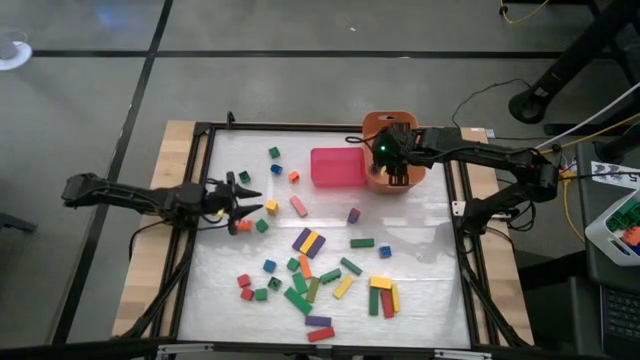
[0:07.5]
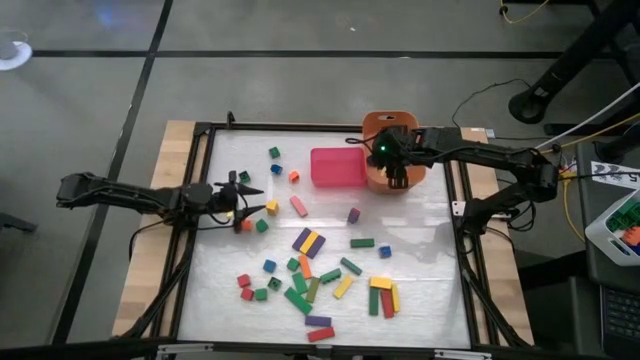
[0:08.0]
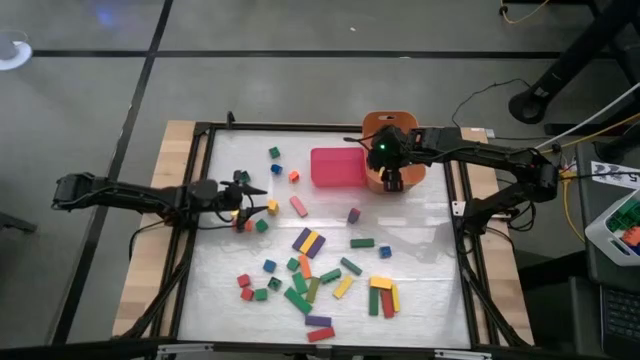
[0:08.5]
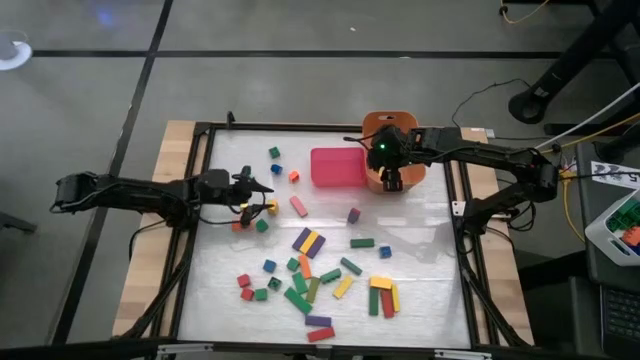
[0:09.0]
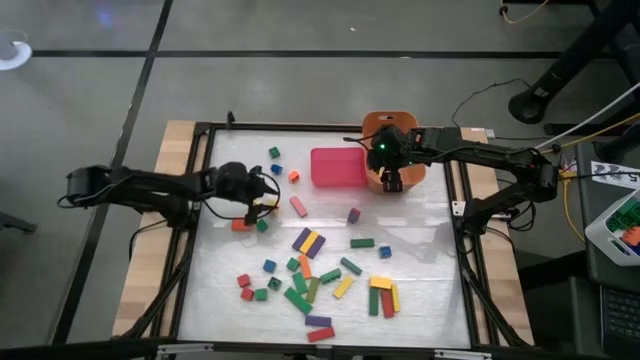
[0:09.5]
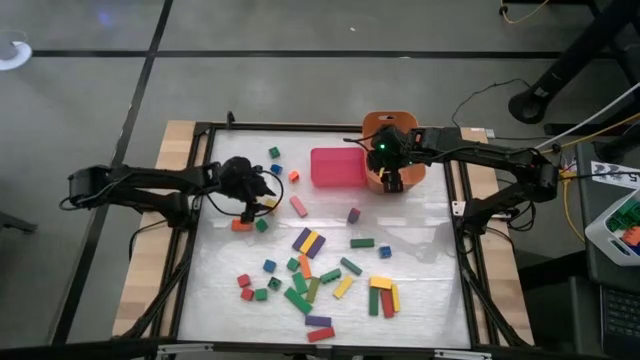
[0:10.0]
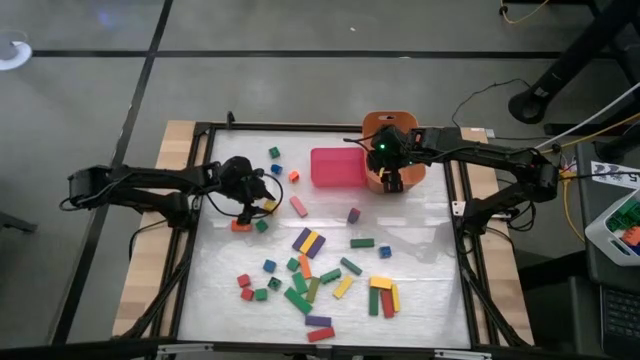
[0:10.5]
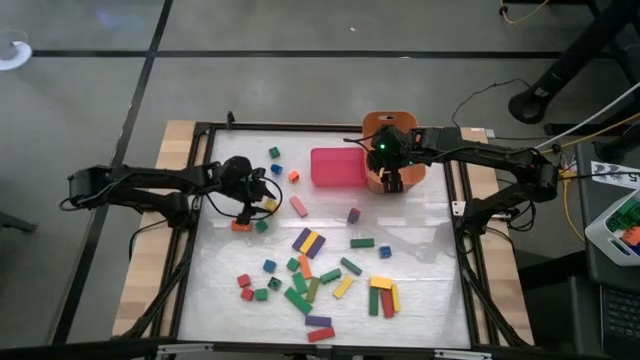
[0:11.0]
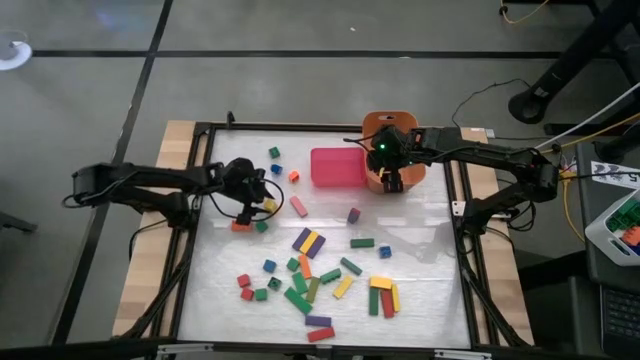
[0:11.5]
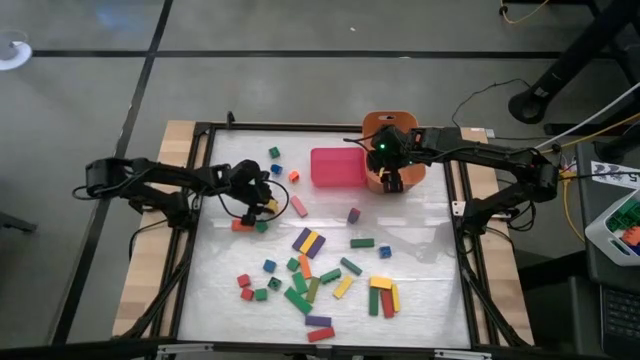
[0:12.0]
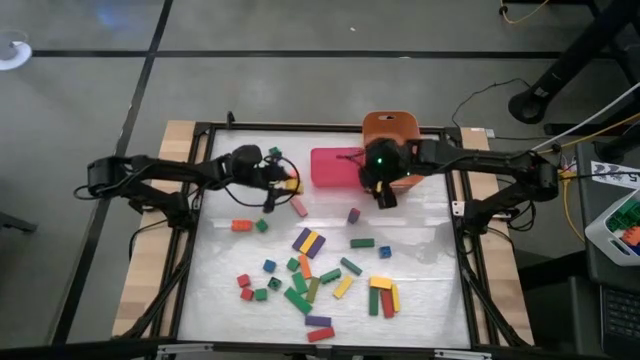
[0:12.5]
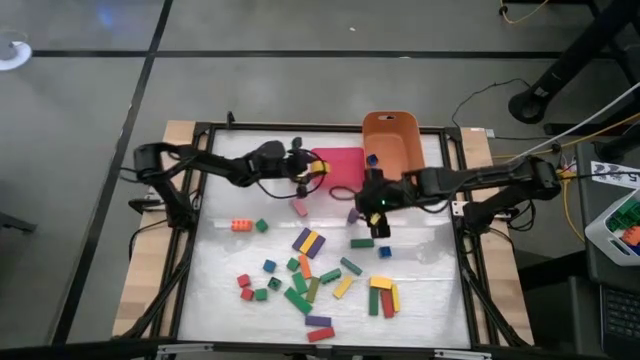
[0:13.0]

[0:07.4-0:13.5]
Task: Sort blocks by size
Put the small yellow block into the pink bin

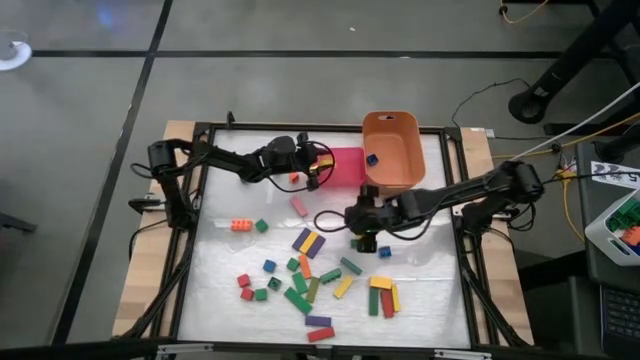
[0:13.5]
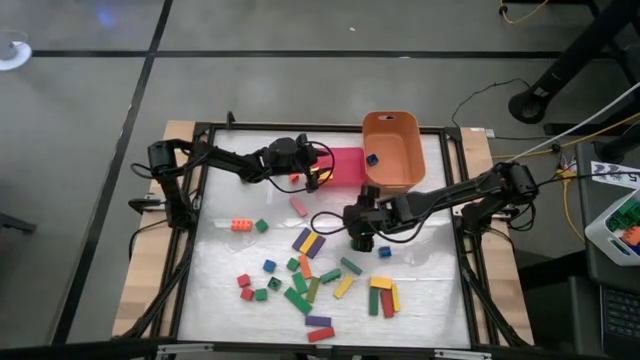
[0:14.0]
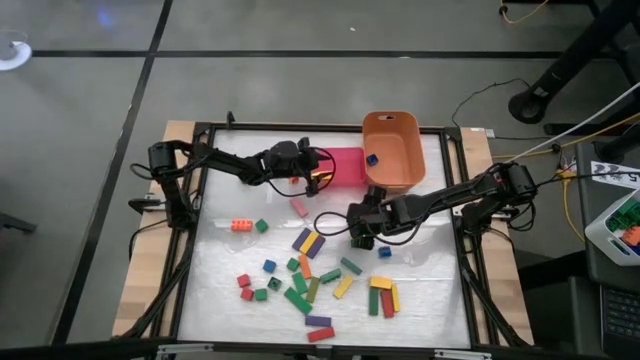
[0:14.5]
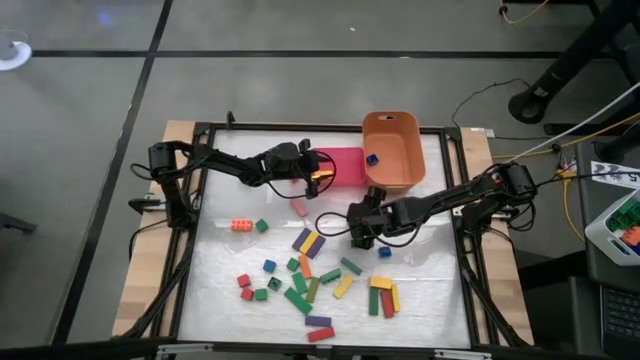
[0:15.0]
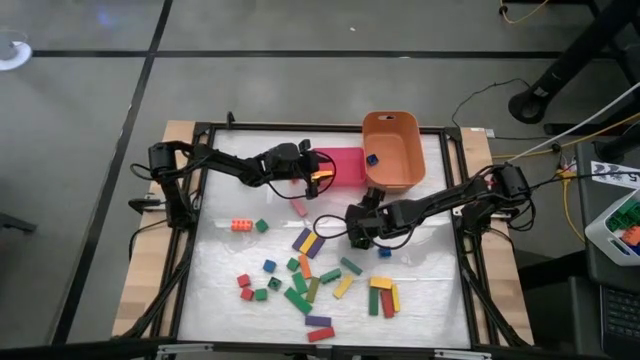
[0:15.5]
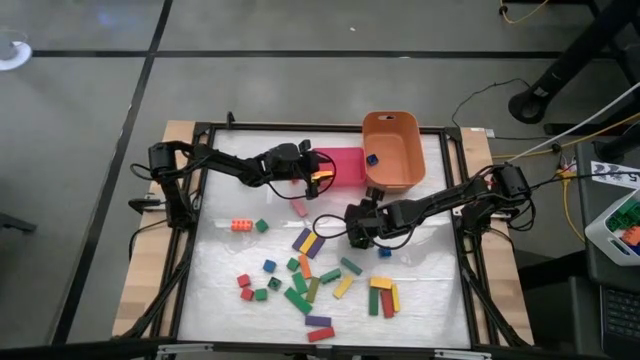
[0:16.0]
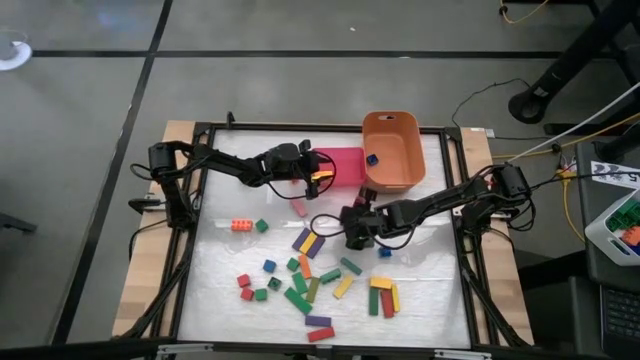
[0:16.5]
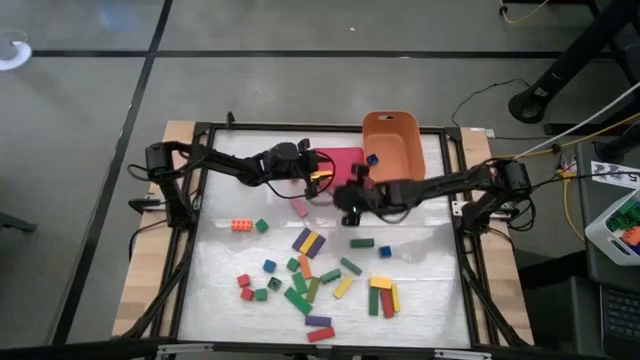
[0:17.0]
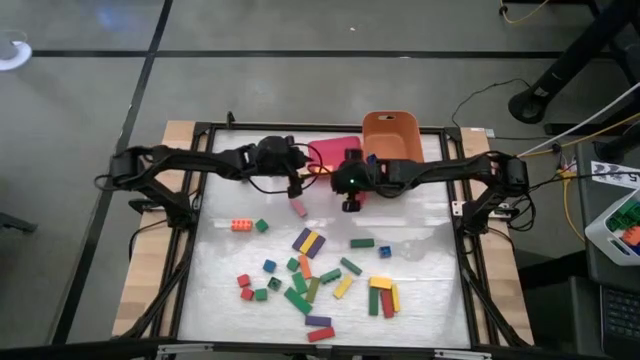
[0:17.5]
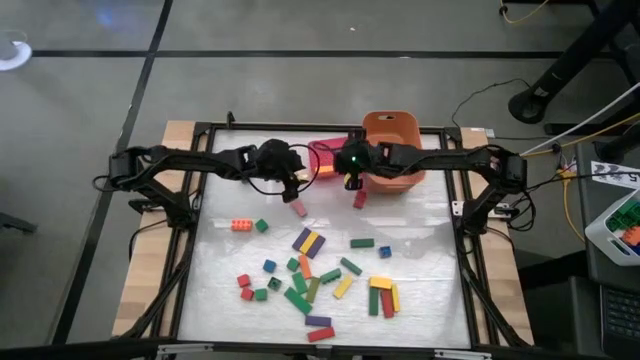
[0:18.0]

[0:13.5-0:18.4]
Put the large purple block into the pink bin

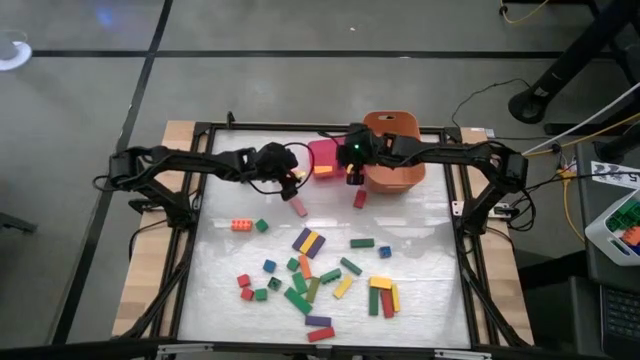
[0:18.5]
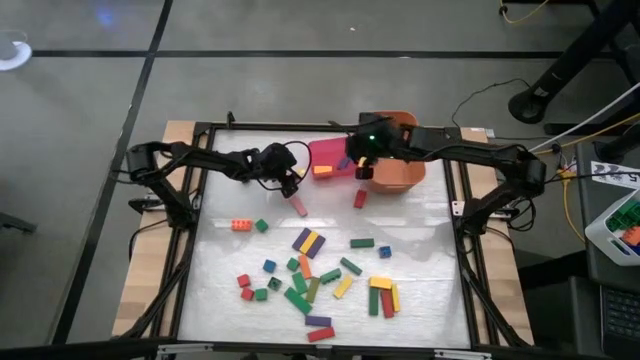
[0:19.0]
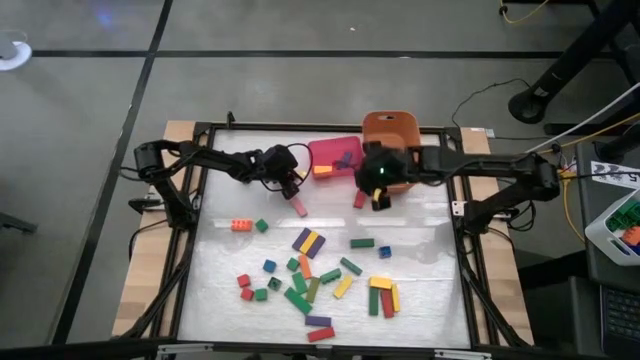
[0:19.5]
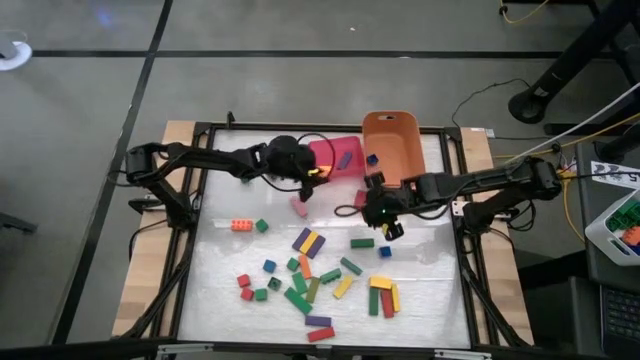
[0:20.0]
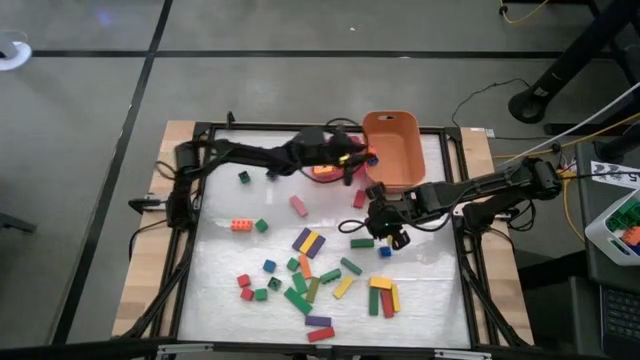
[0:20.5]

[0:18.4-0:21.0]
Put the small orange game piece into the orange bin

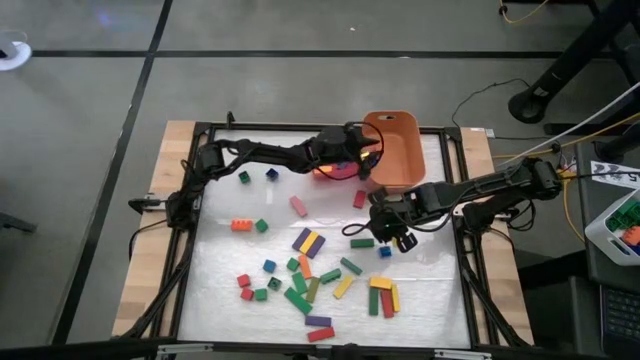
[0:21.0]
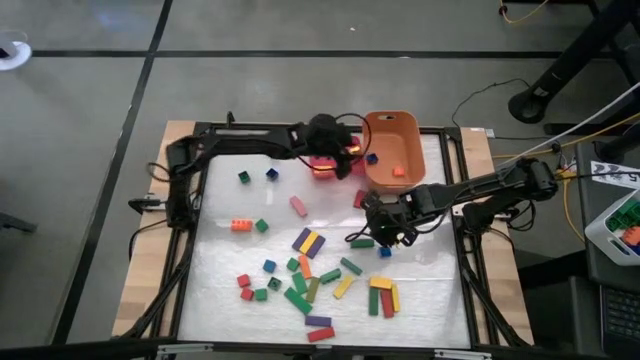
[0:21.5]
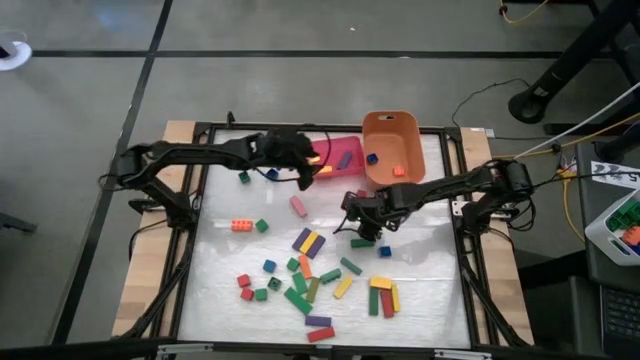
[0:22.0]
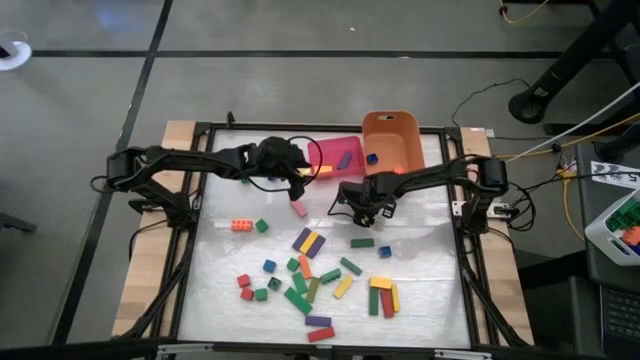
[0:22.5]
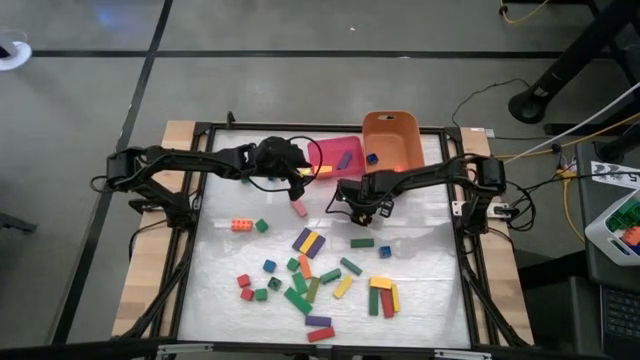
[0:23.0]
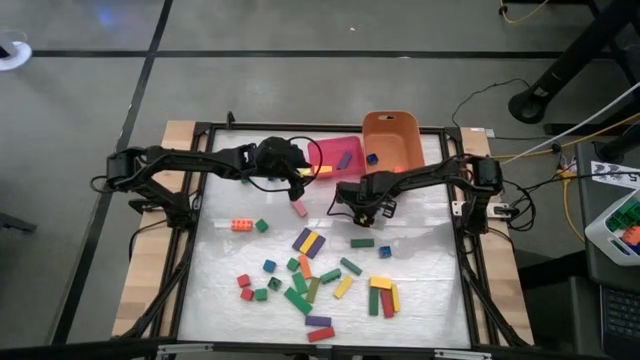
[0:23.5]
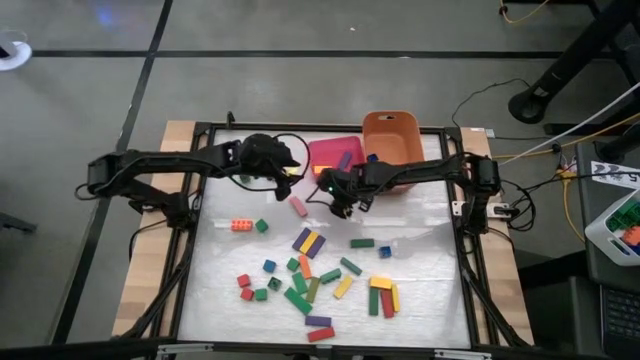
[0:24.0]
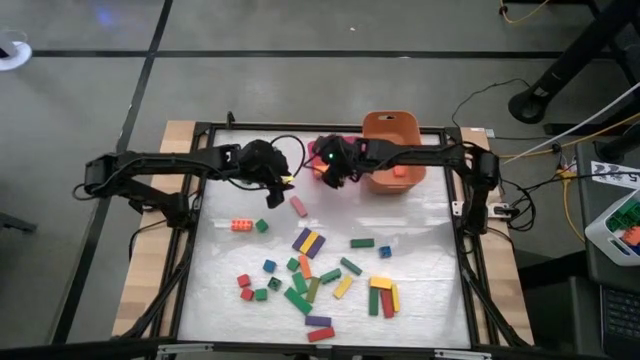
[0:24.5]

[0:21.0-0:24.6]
Put the large red block into the pink bin

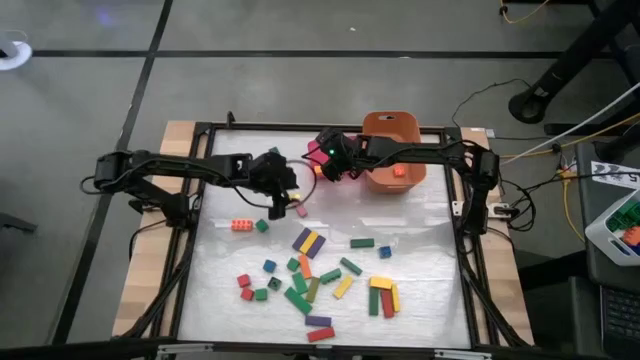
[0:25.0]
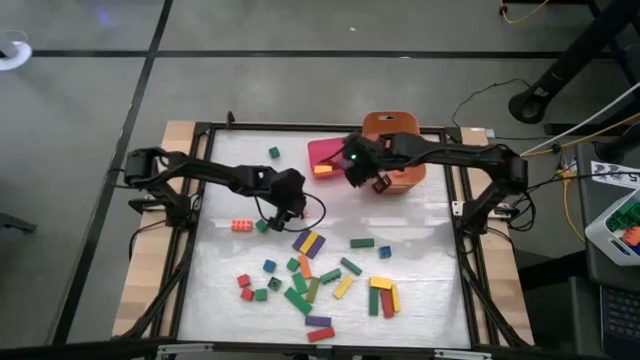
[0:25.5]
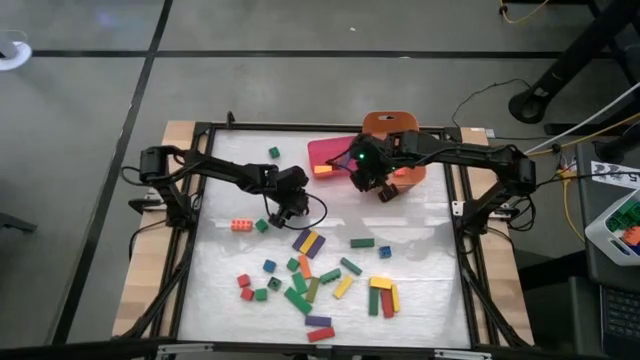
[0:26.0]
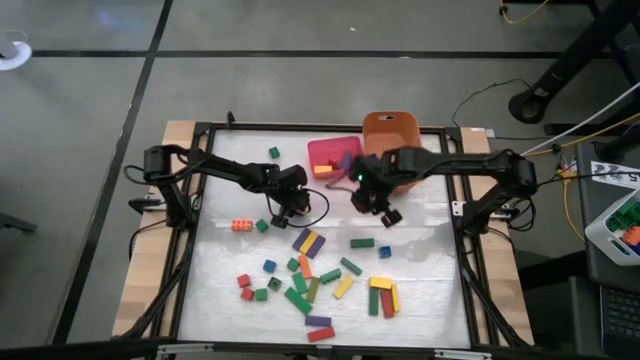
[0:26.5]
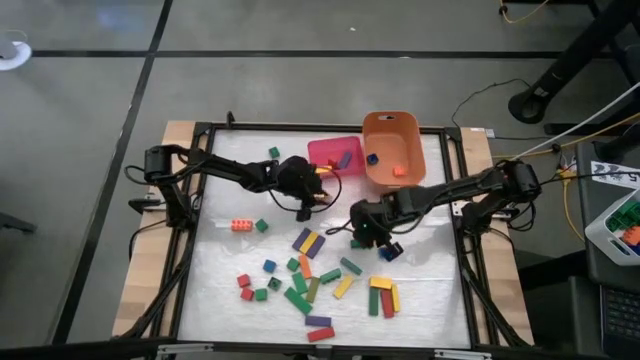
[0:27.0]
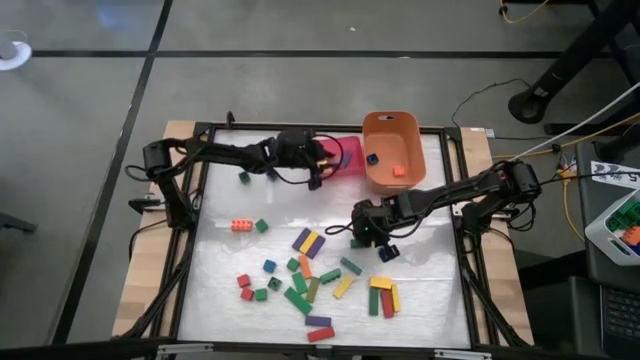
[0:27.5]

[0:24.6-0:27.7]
Put the large pink block into the pink bin

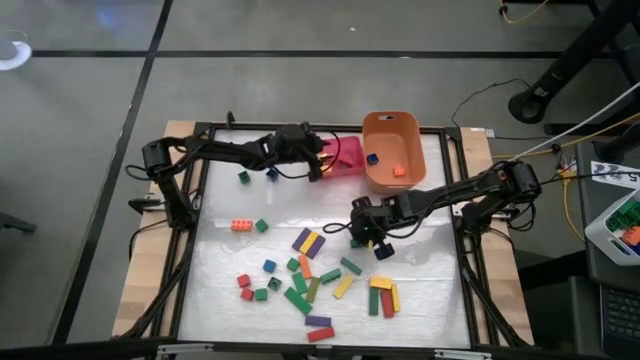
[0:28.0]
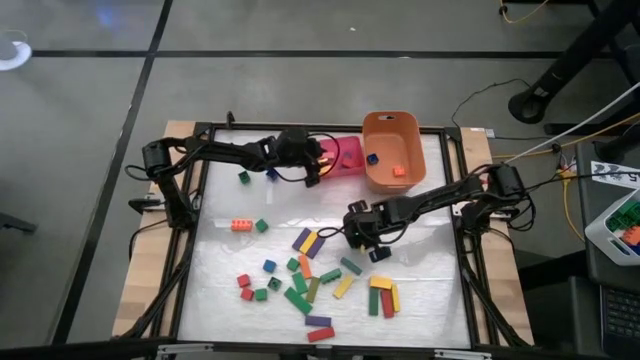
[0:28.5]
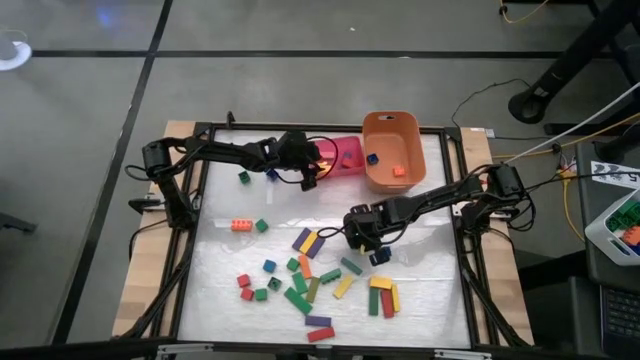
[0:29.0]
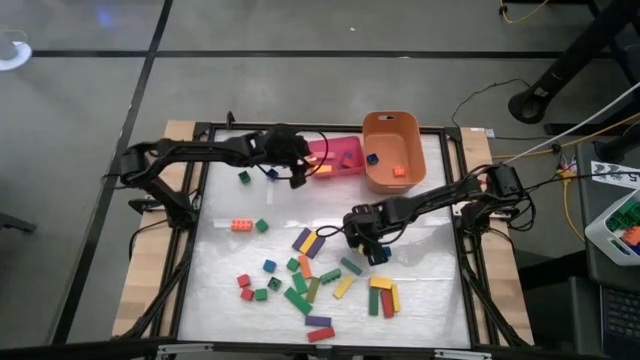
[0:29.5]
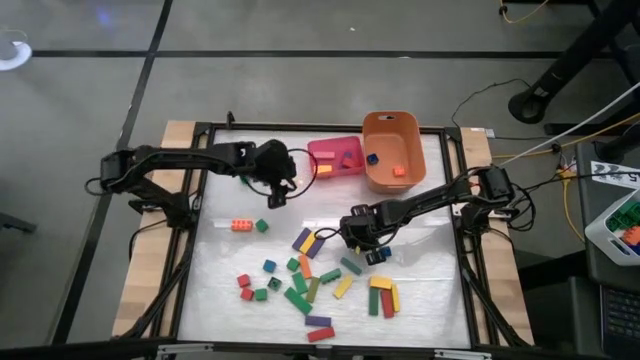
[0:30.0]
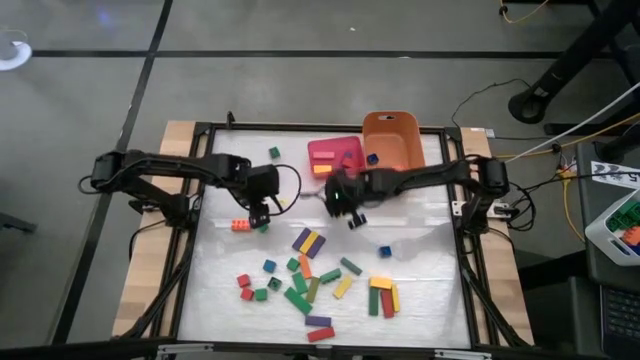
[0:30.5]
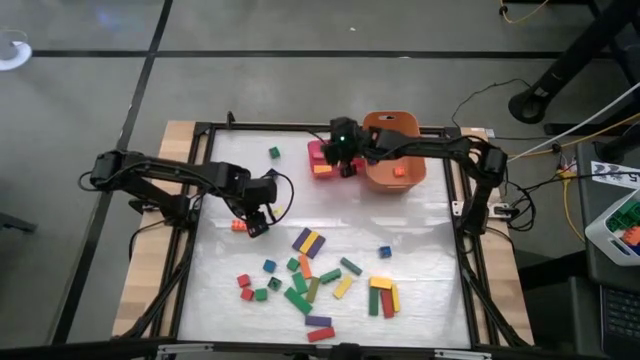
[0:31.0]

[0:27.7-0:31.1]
Put the large green block into the pink bin
